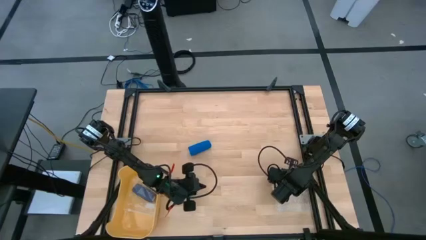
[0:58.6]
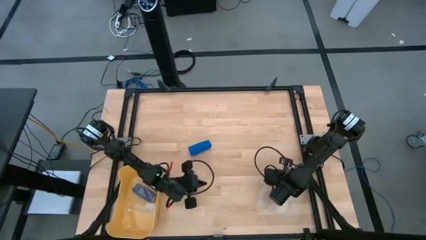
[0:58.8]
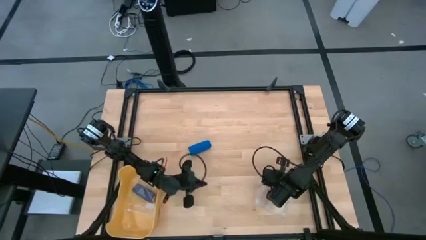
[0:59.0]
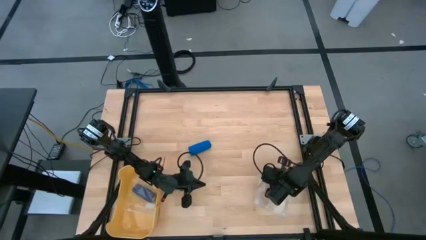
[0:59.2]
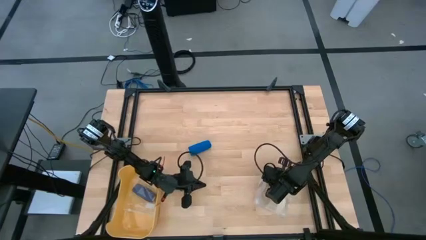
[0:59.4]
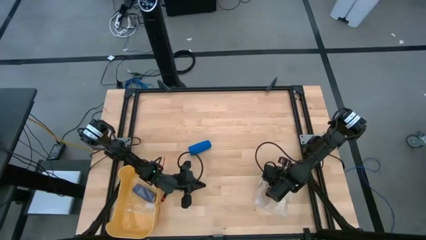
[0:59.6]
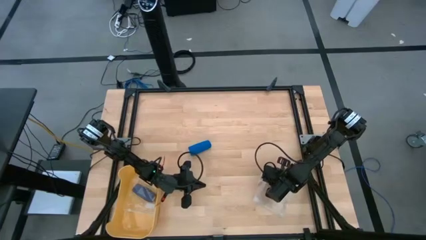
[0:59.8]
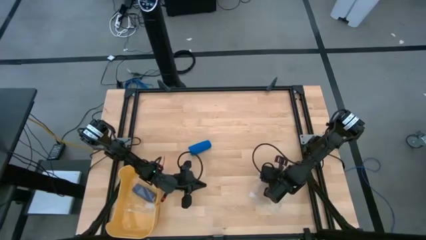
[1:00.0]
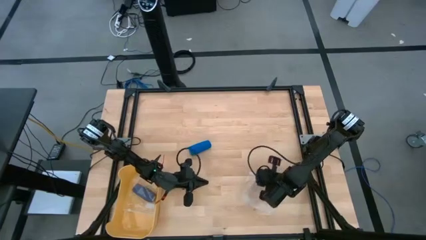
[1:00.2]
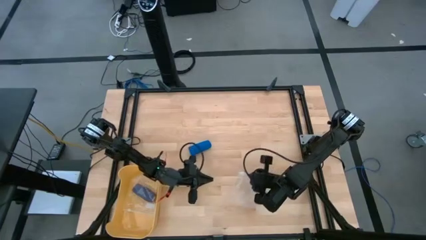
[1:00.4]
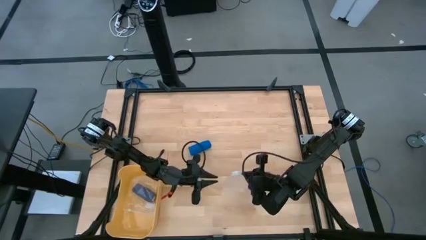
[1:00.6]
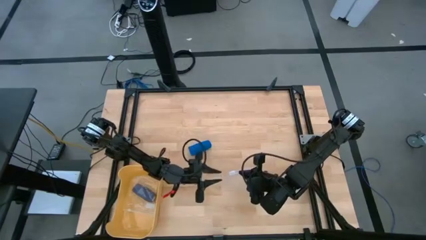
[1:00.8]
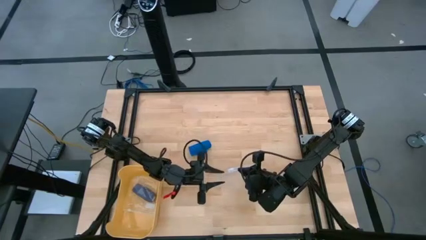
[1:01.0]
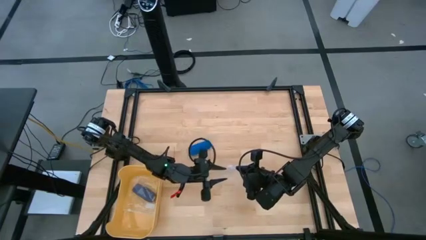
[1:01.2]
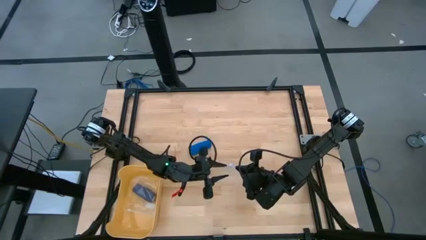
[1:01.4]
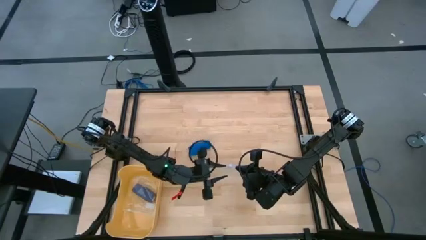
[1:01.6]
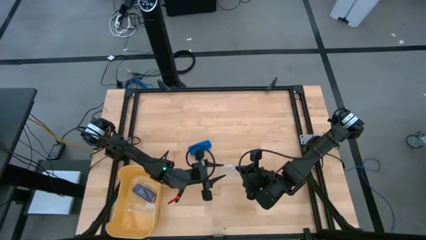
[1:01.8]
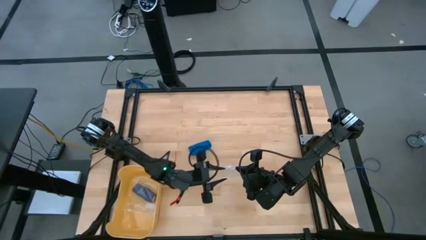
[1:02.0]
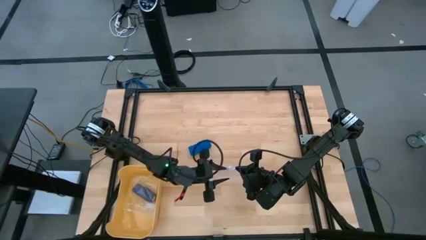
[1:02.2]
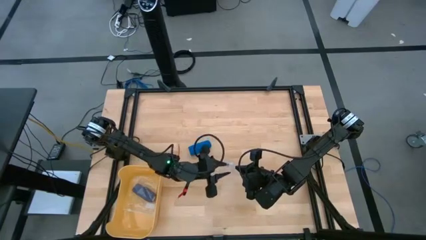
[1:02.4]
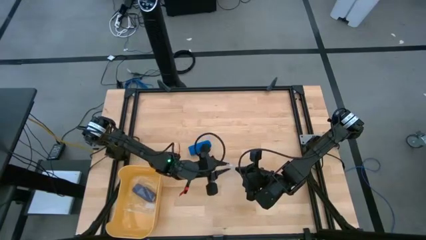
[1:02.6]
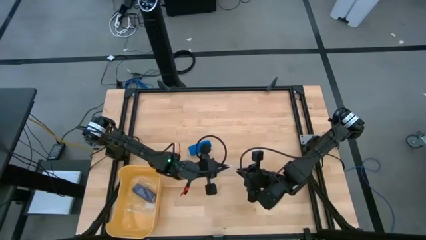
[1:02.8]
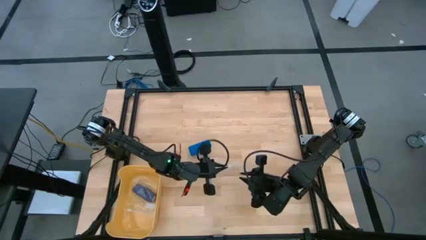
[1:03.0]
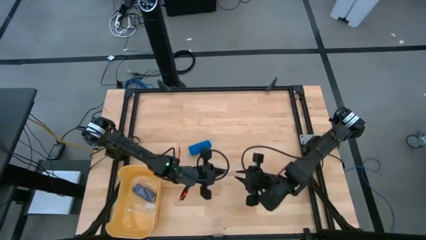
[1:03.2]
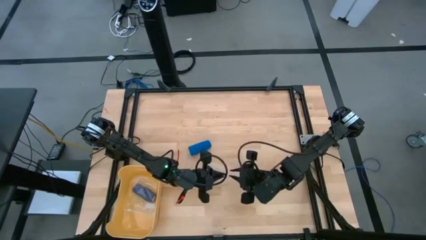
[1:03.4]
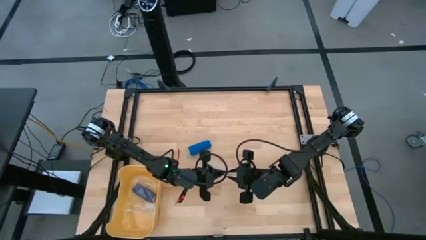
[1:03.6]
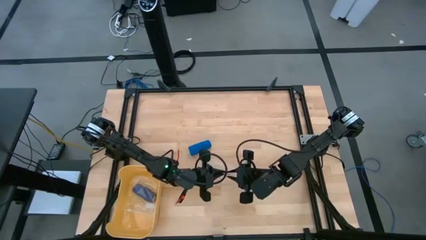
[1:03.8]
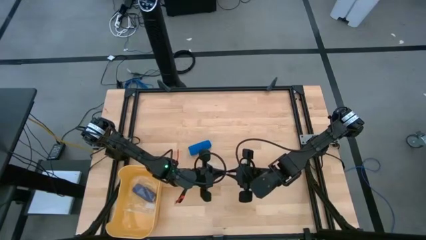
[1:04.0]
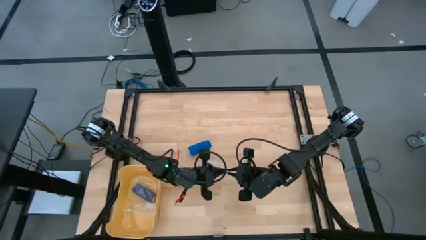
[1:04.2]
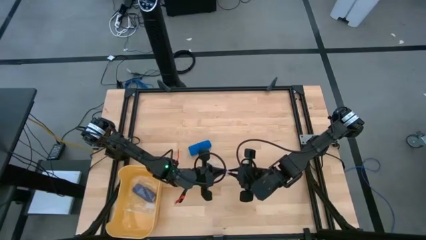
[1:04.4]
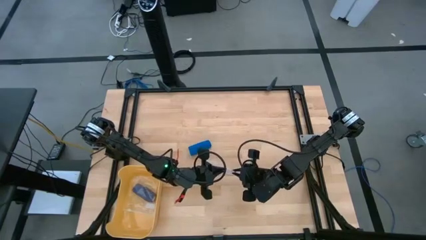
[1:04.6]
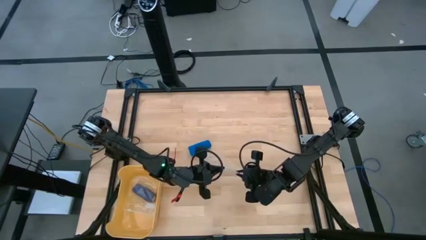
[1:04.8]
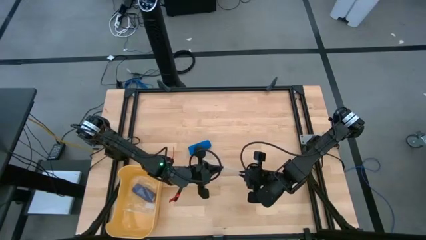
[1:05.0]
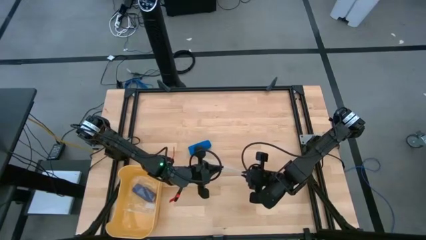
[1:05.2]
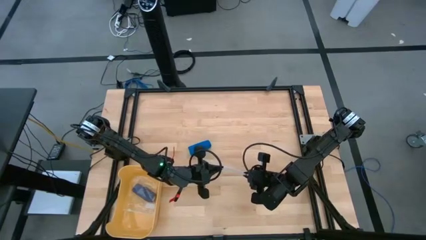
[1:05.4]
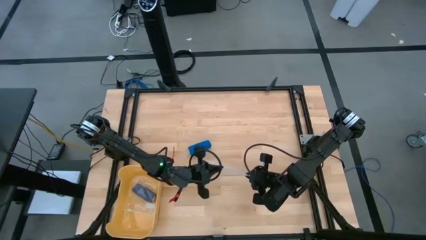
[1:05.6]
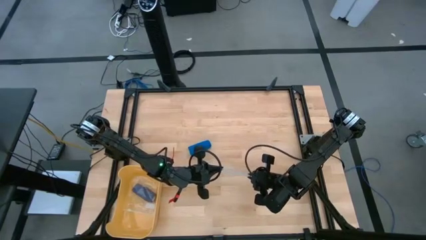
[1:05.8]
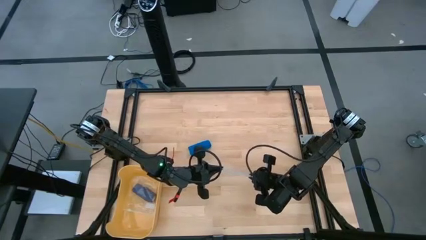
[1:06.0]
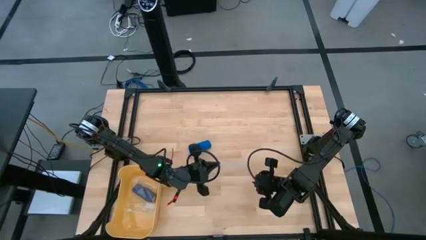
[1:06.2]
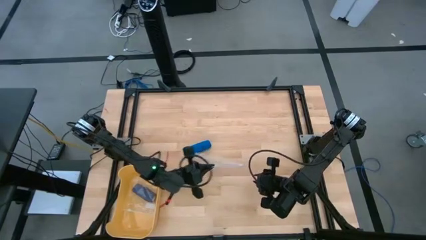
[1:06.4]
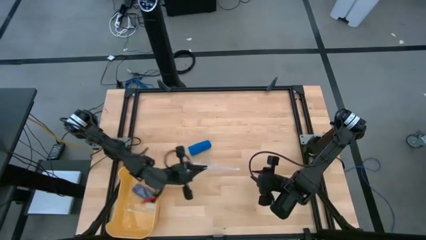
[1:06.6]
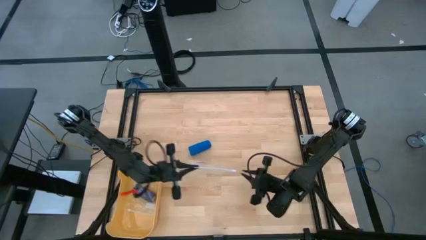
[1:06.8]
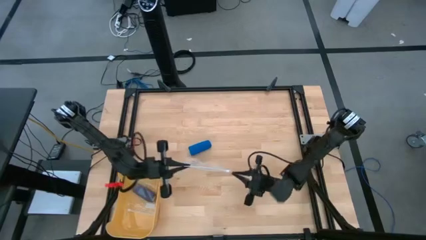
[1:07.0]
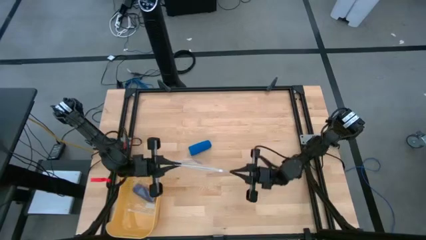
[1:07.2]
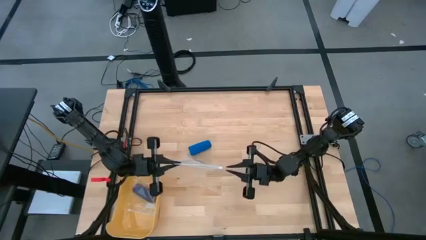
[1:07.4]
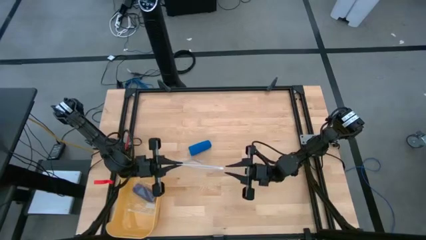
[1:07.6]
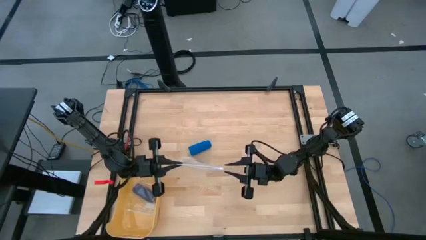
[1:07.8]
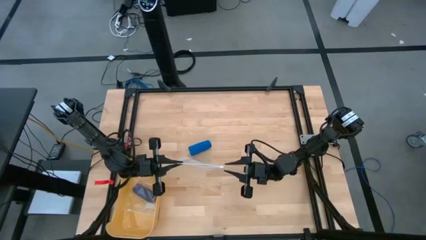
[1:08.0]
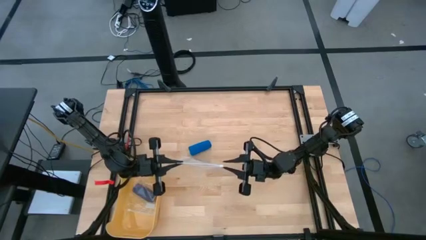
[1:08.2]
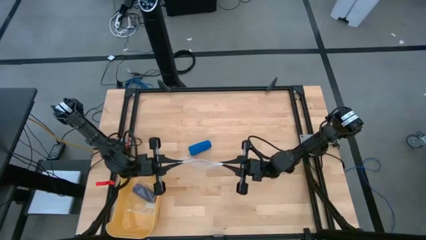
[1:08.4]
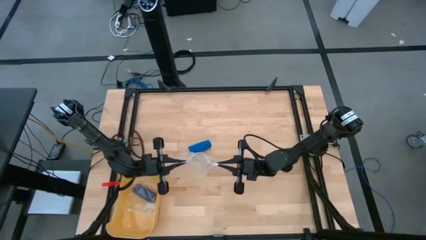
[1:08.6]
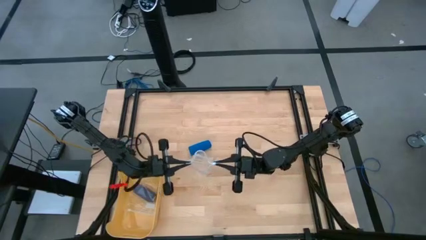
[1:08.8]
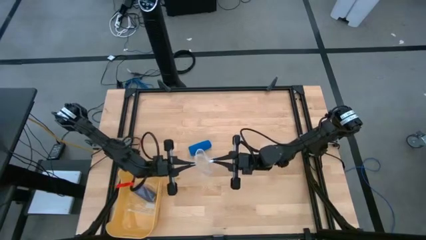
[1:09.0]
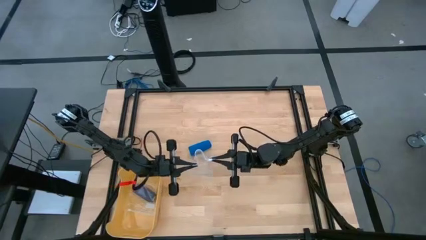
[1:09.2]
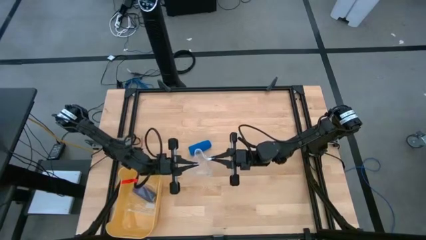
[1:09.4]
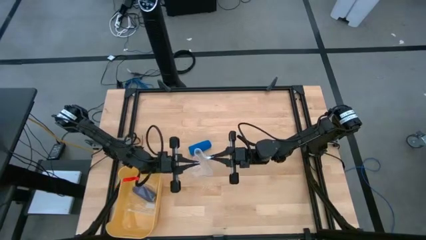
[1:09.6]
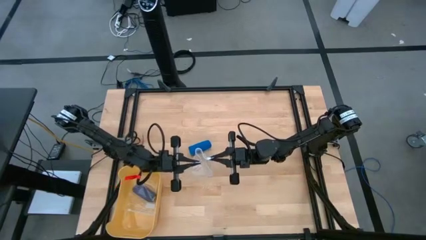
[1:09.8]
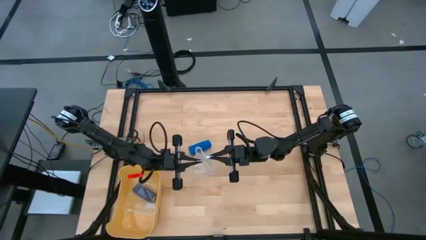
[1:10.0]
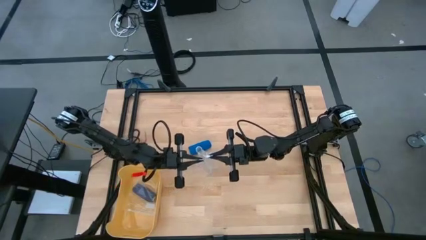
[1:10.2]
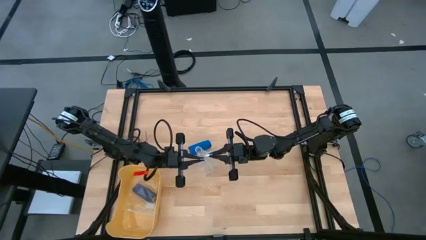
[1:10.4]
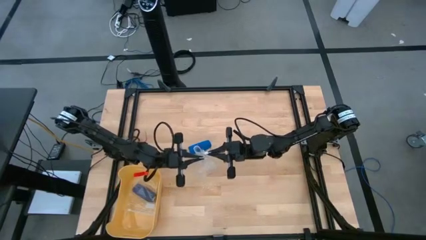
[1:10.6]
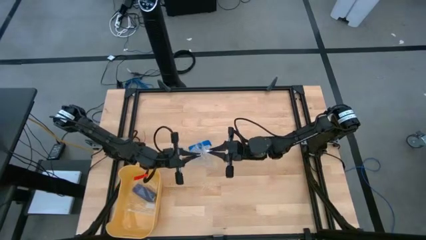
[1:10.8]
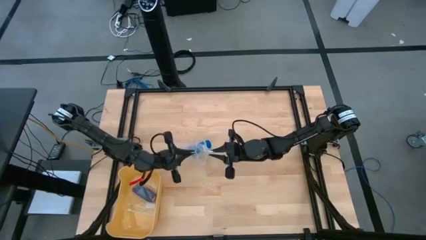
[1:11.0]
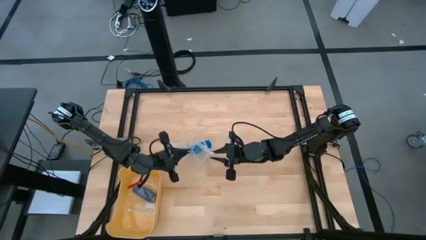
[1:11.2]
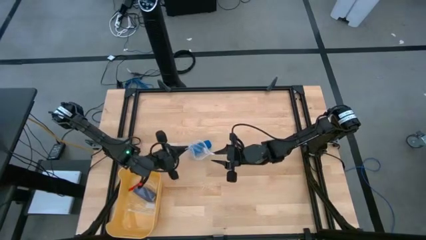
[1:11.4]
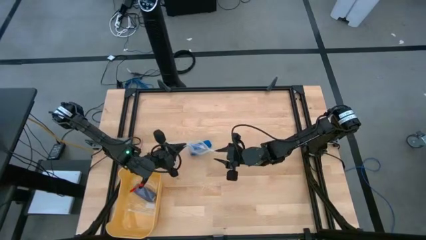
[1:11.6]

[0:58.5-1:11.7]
Task: Roll bandage
Open the transparent zip bag

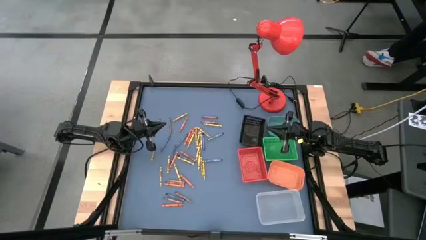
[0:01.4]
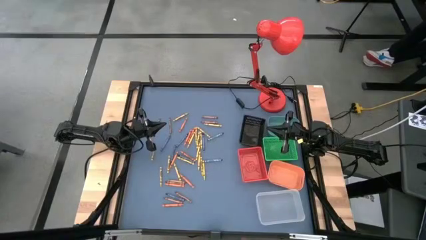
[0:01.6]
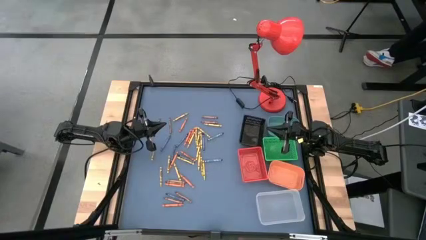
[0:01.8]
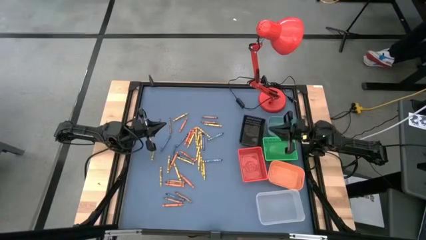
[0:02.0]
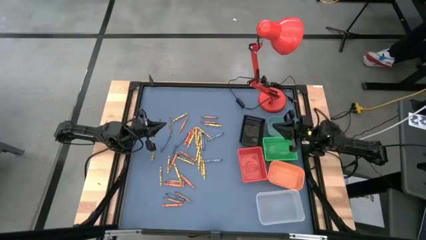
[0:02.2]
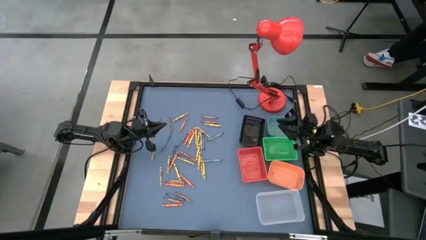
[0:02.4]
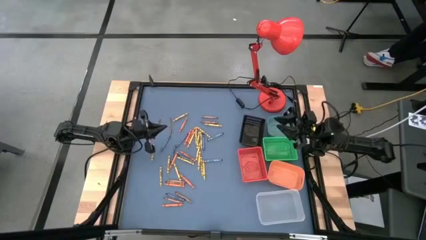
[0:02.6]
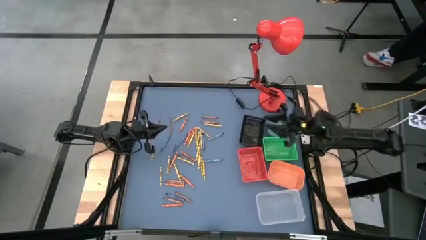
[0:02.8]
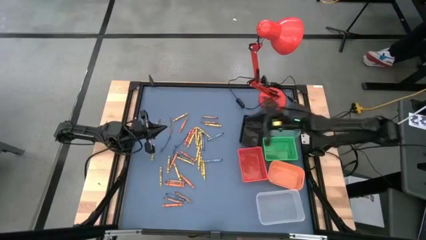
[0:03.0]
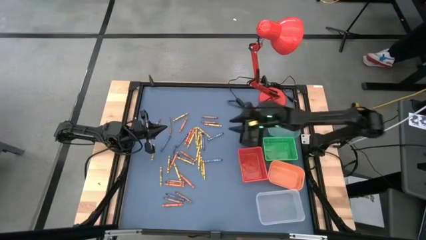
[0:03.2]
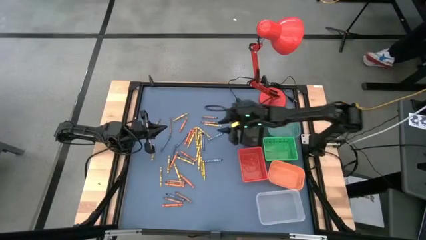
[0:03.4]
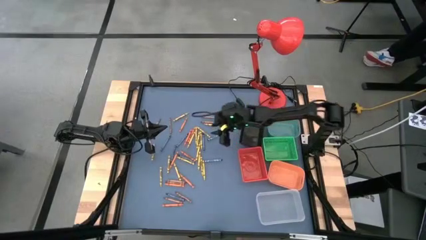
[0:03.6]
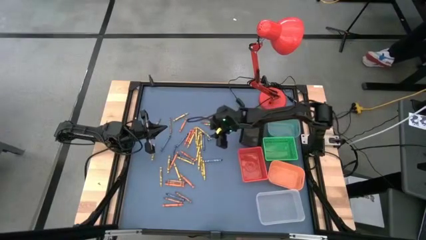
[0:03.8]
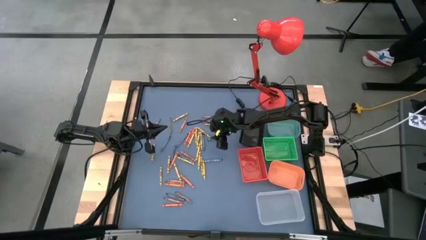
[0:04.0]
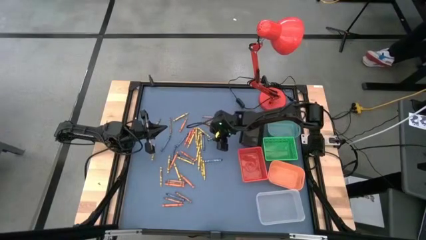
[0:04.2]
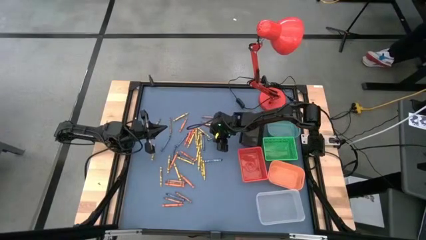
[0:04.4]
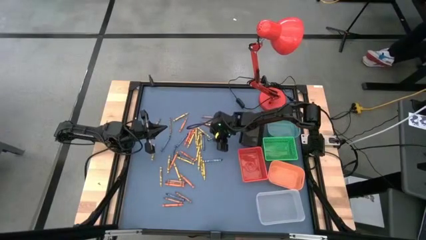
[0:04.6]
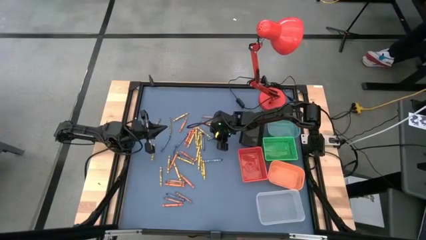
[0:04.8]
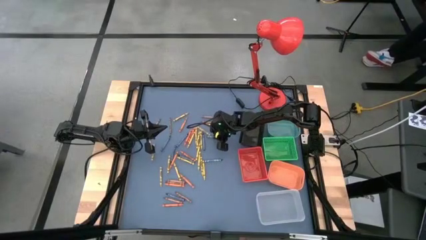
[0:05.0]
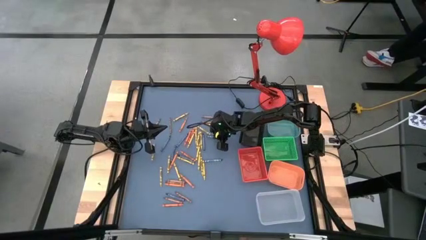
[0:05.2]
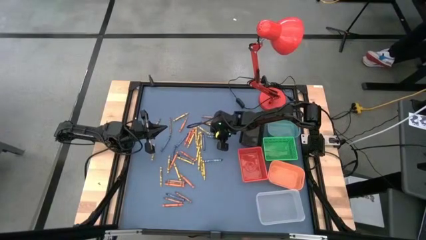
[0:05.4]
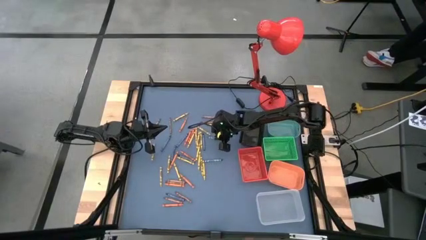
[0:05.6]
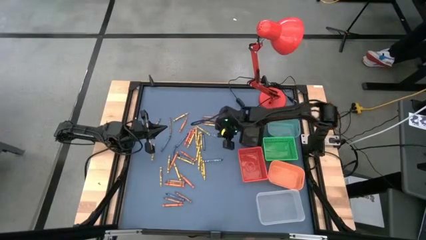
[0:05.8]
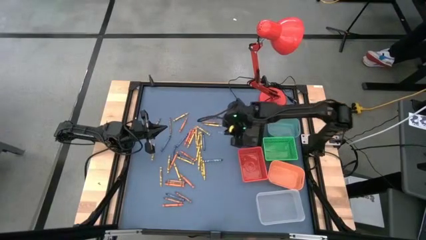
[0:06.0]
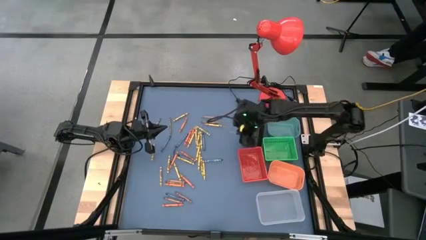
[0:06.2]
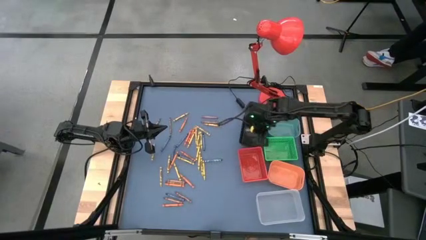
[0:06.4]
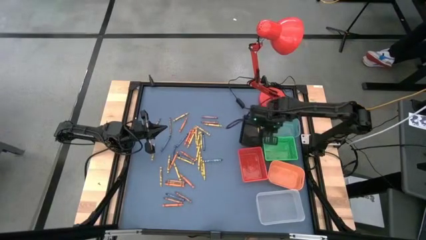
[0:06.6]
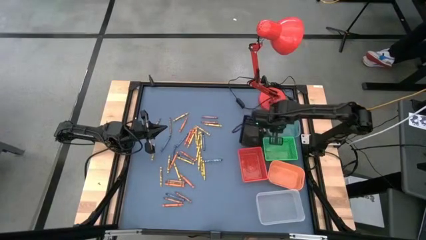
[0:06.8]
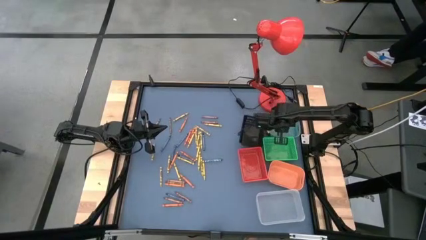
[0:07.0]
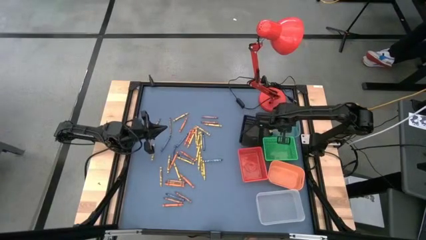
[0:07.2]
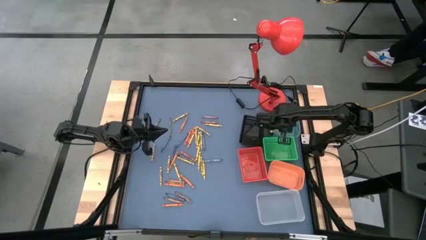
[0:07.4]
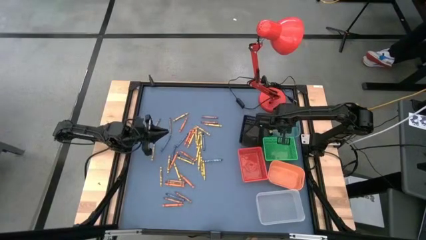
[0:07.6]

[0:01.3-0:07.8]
Task: Sort crayons
Put the dark blue crayon into the blue bin
